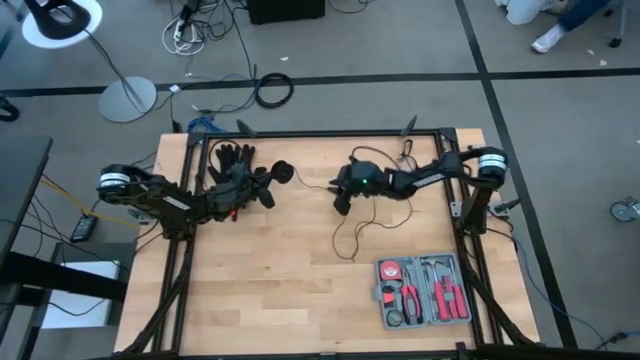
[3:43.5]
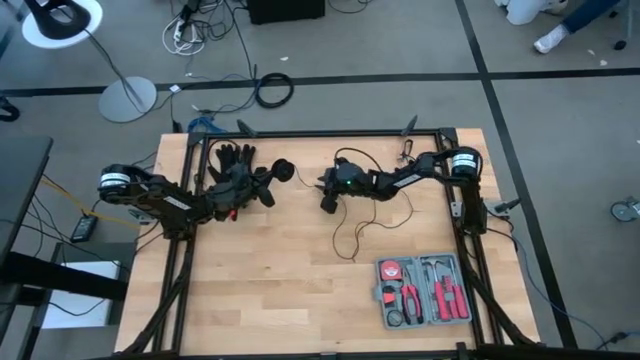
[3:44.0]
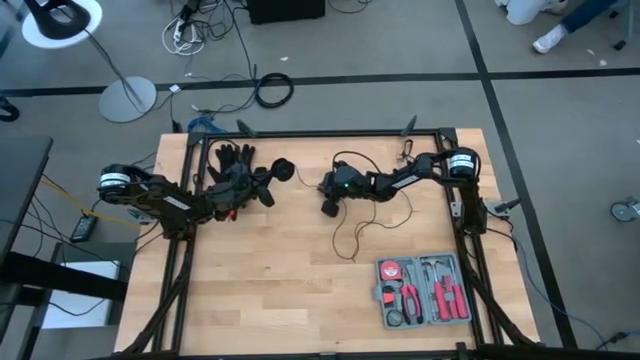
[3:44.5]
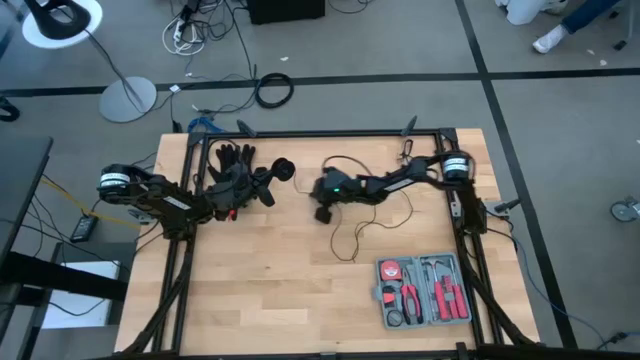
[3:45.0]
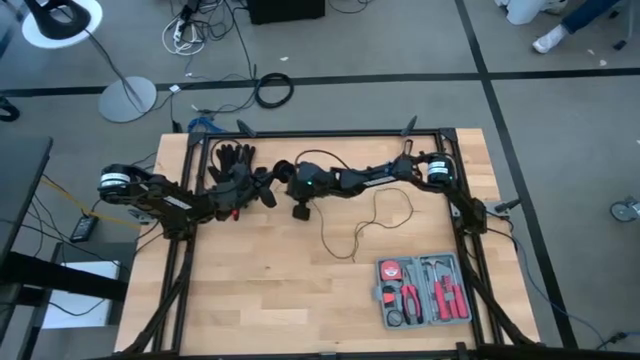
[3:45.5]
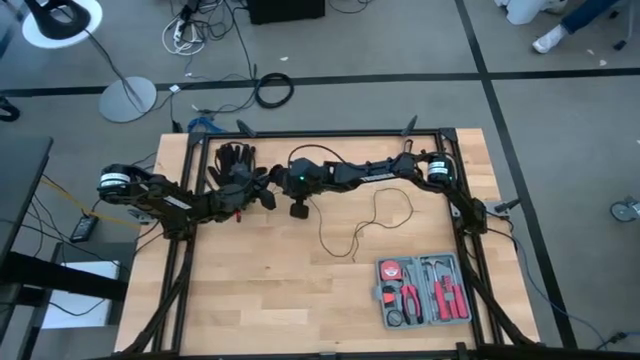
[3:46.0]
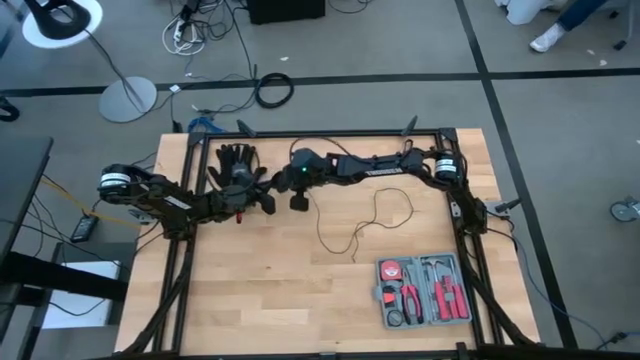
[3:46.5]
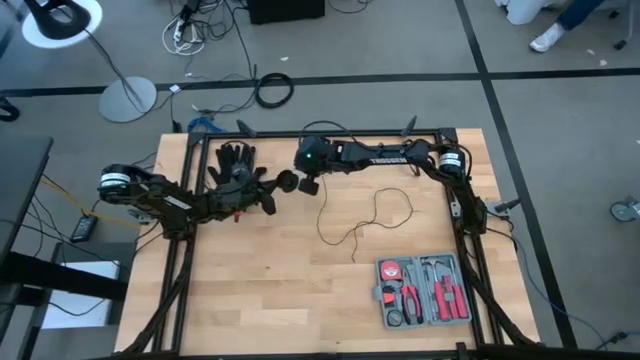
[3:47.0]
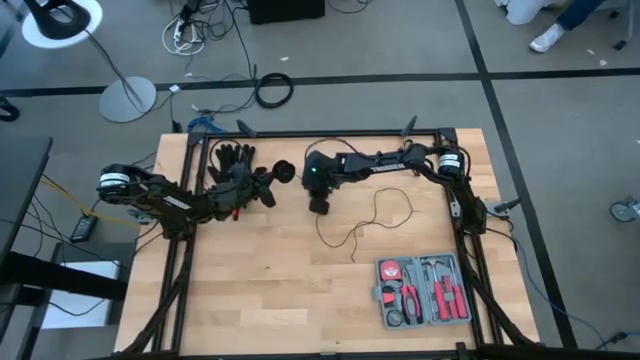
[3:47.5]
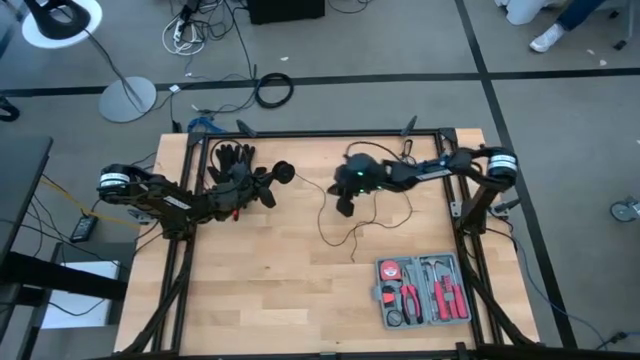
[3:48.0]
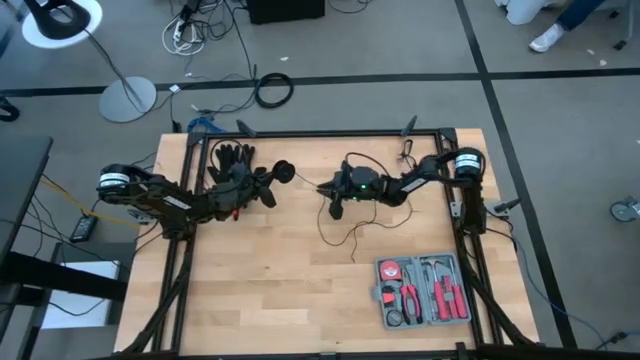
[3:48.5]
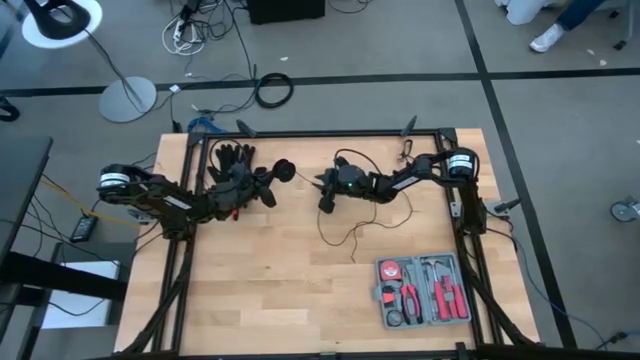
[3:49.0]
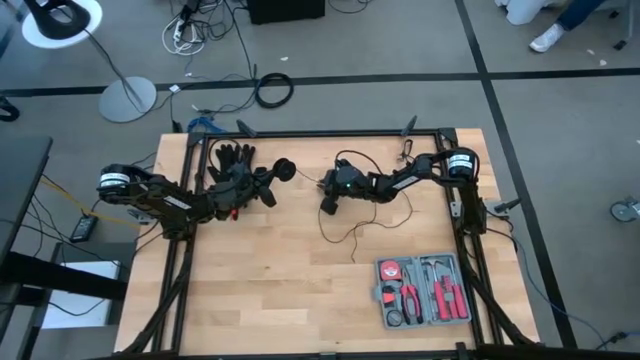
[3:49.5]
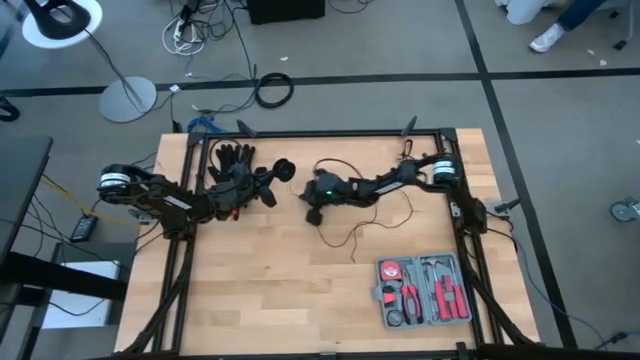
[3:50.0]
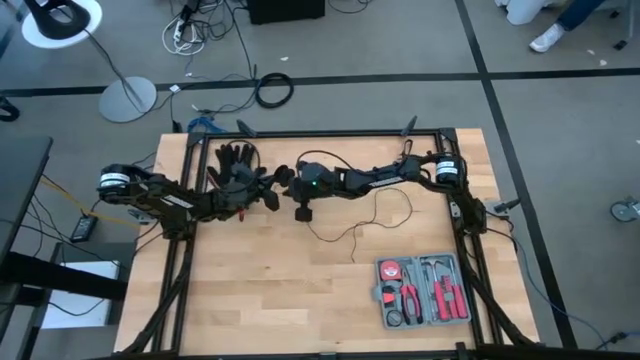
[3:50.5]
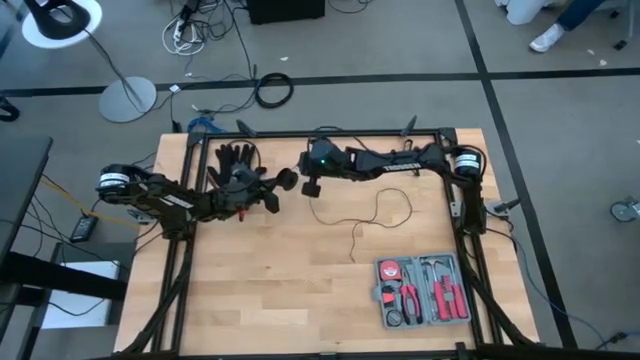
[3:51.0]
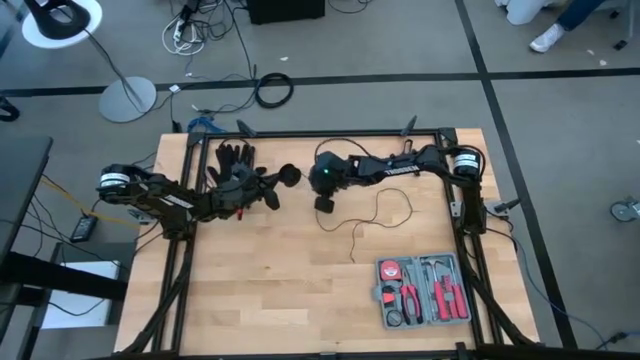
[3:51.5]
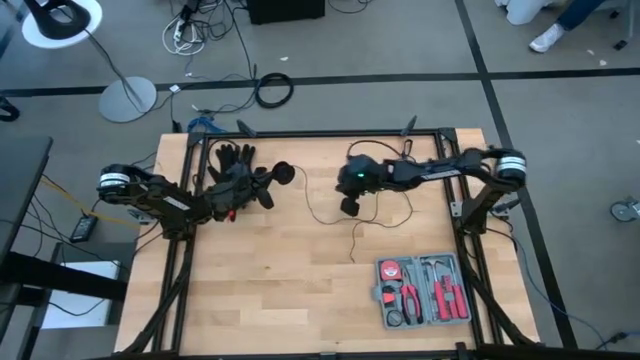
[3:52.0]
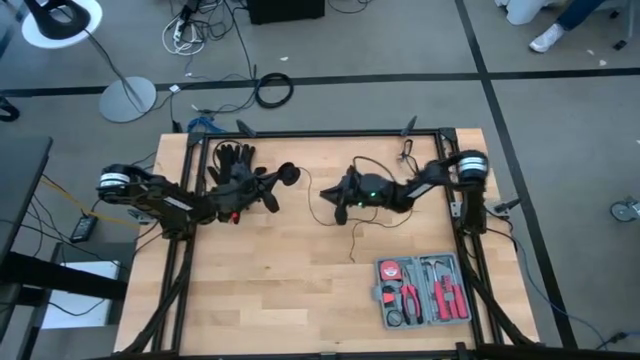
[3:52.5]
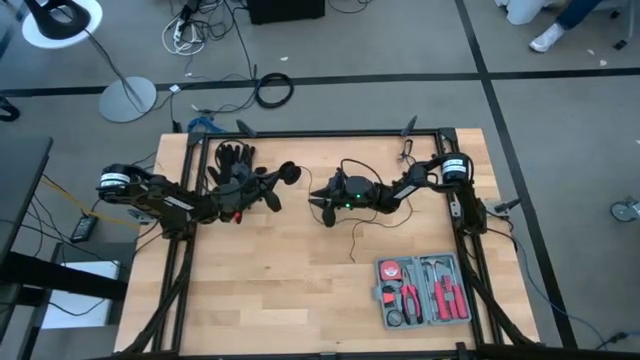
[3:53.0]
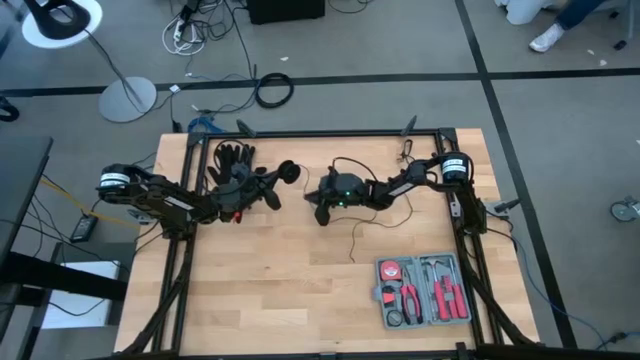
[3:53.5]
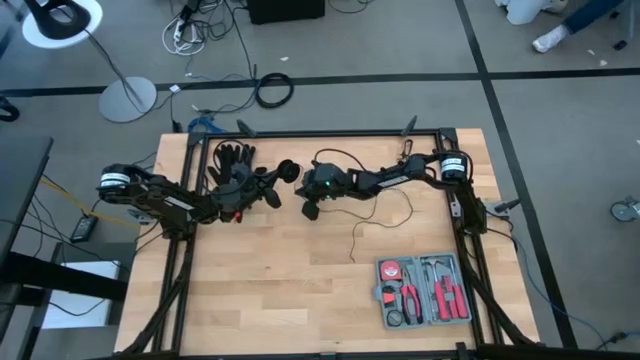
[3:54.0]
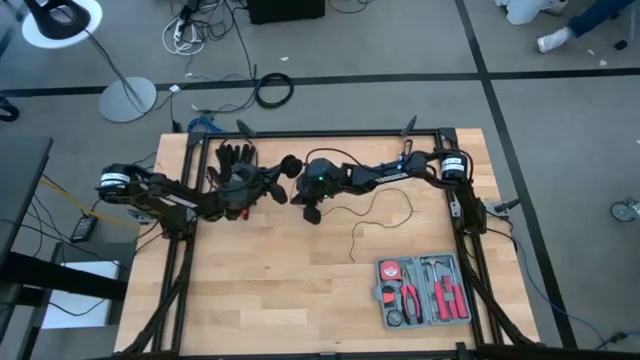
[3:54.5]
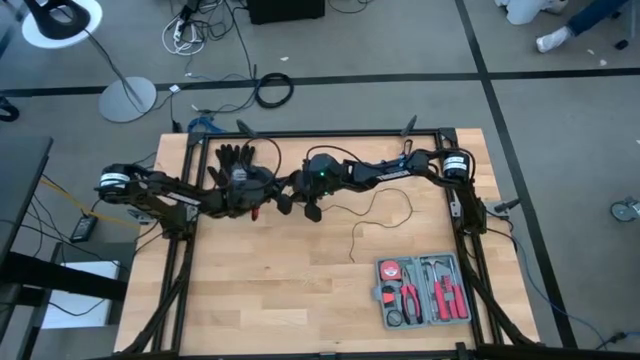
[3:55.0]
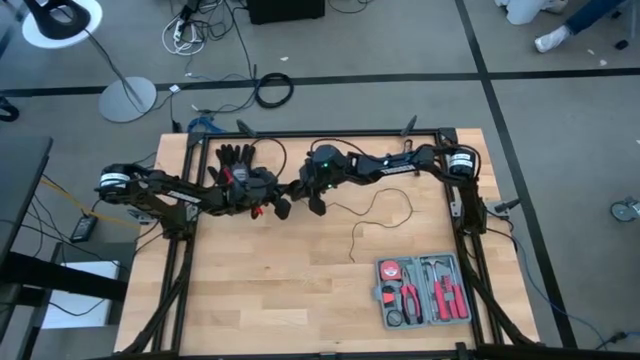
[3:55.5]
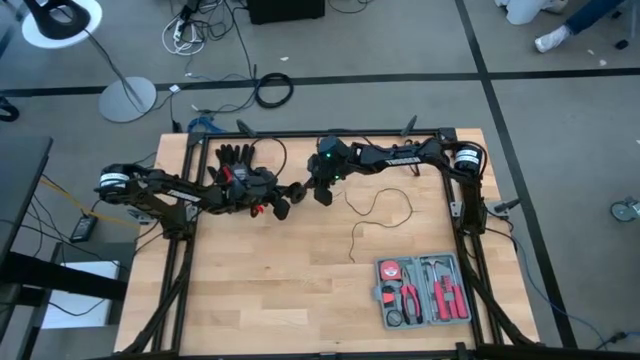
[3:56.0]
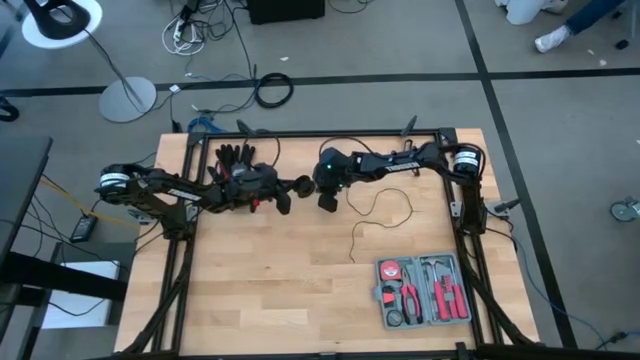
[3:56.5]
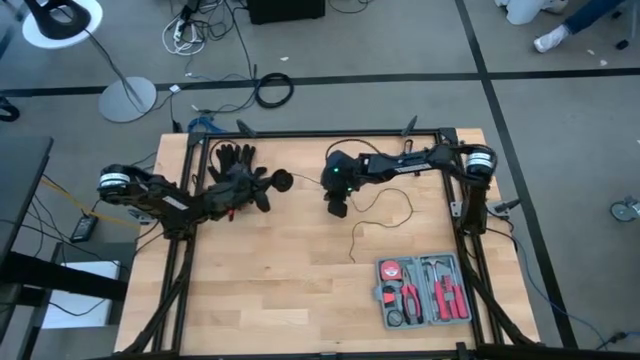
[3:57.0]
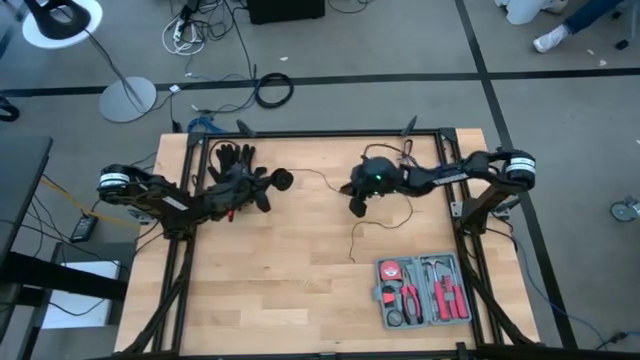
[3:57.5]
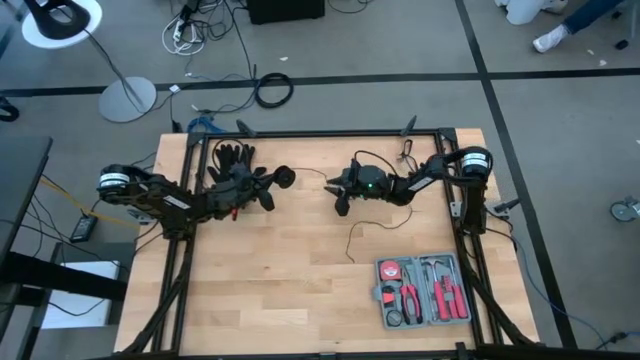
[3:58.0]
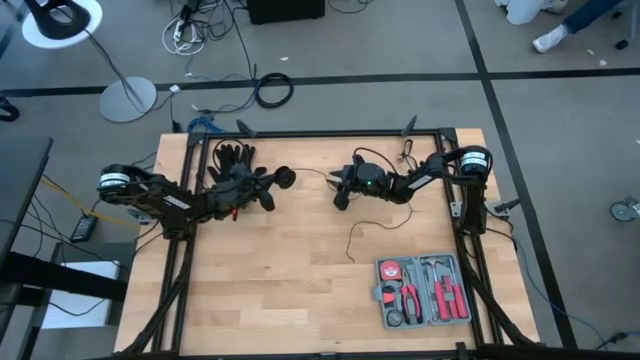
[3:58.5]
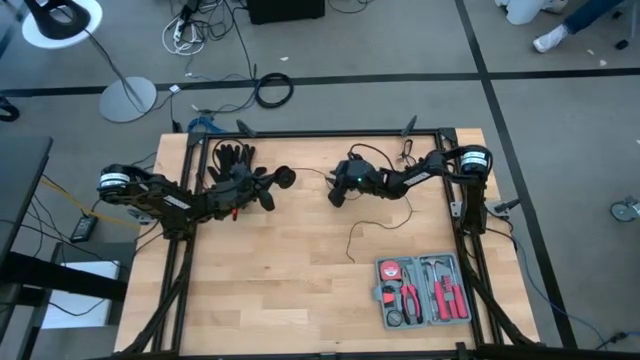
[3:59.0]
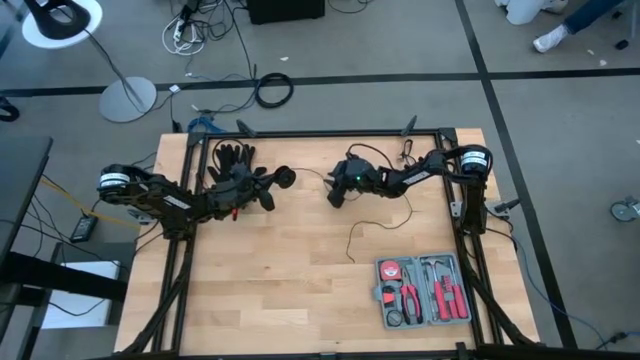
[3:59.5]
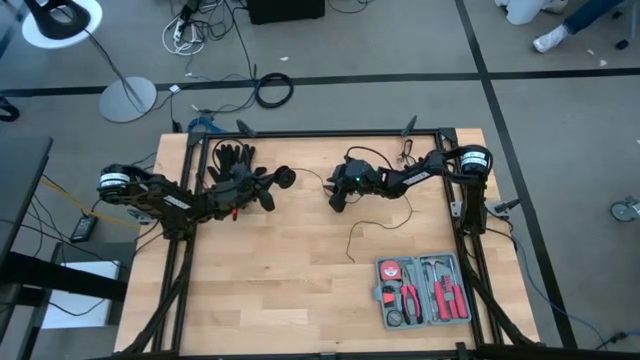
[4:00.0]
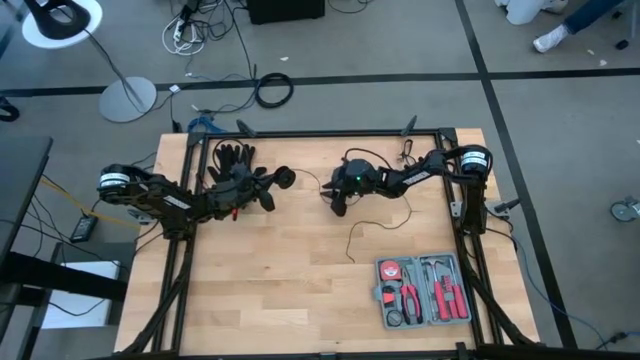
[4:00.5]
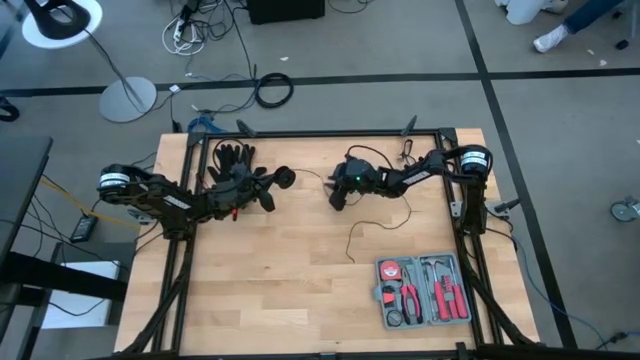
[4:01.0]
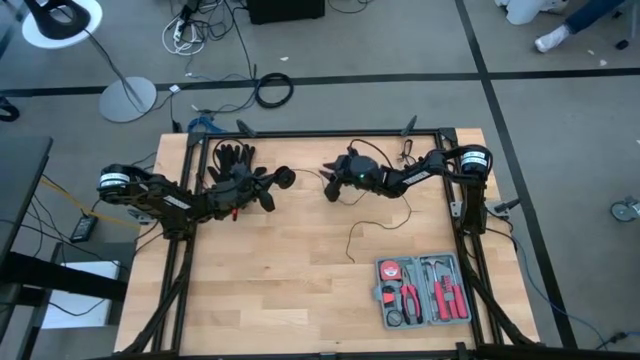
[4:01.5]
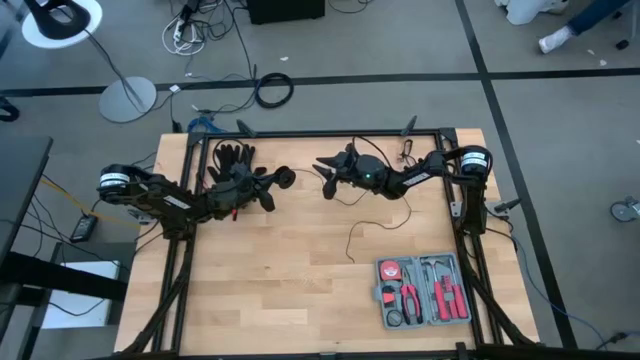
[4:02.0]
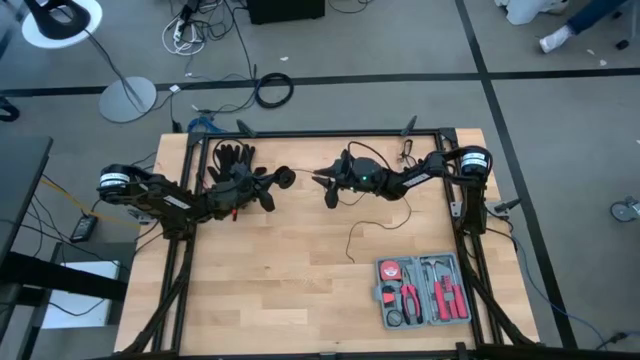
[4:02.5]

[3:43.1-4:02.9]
Task: Coil cords
Coil the black wire

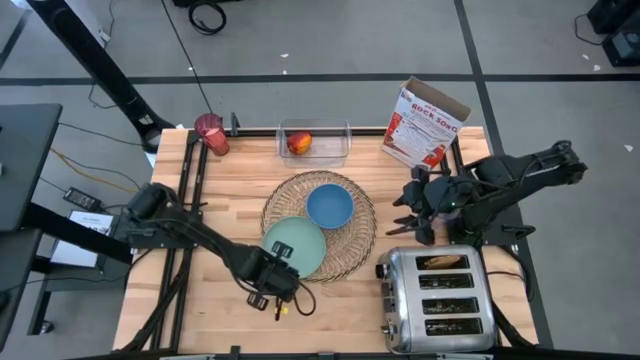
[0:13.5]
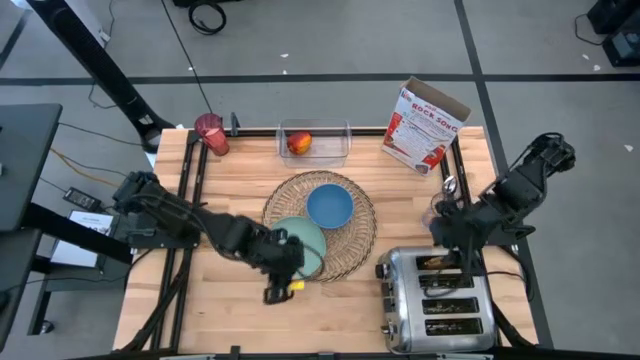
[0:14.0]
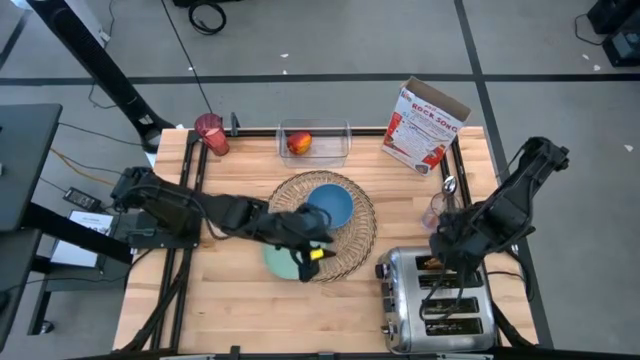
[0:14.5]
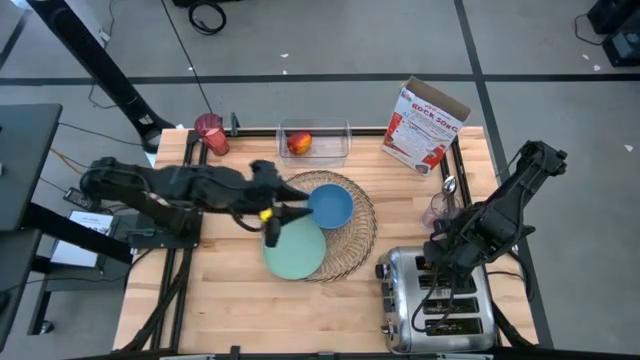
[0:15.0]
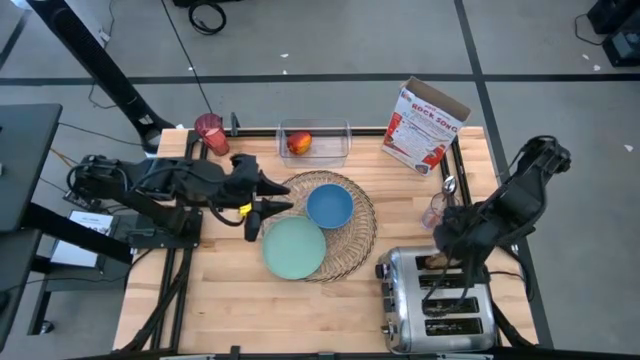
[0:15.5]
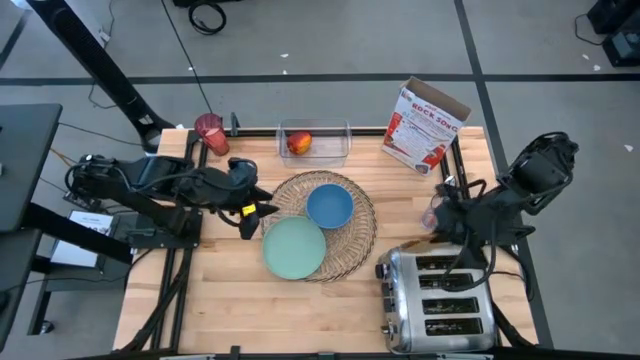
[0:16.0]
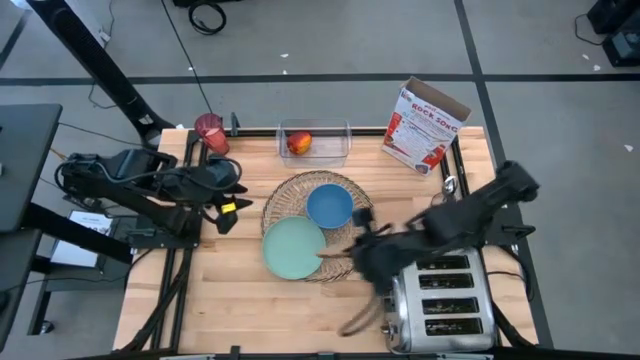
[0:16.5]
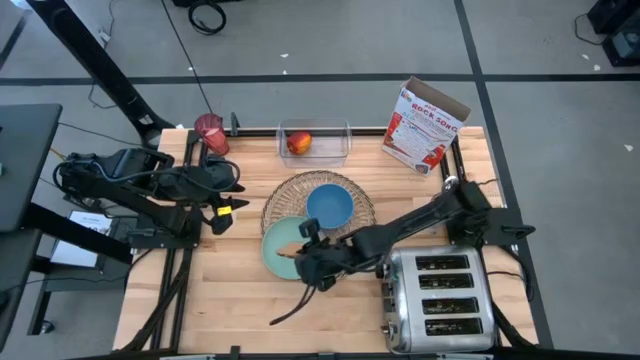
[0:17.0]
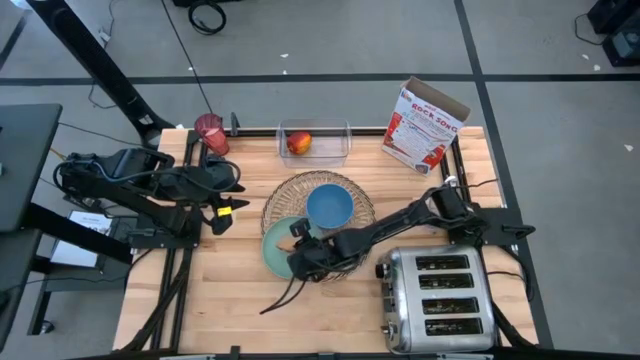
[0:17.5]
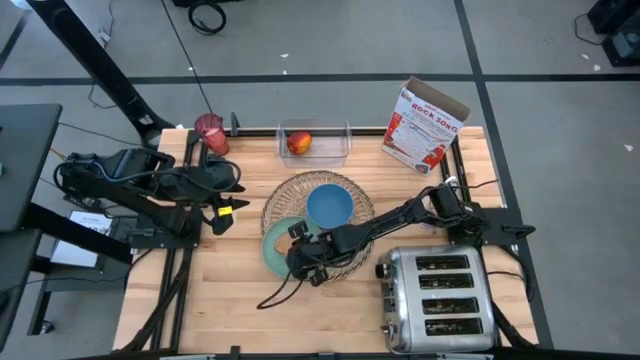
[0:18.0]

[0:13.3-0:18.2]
Task: Arrange a breakfast setting
Put the toasted bread on the green plate
